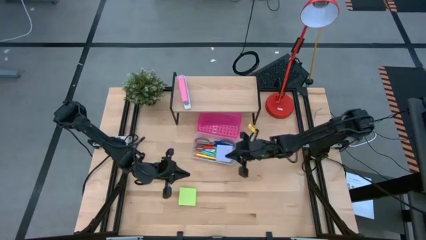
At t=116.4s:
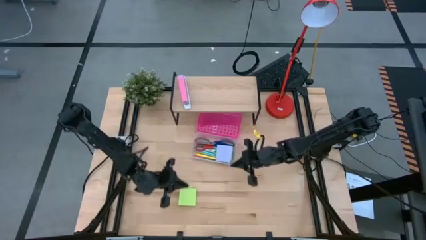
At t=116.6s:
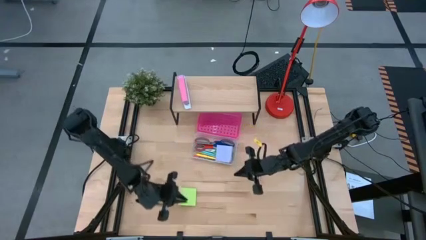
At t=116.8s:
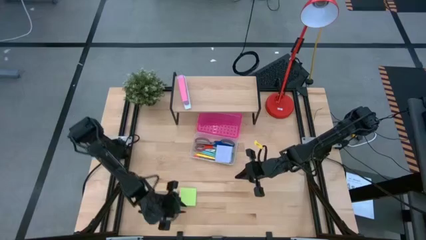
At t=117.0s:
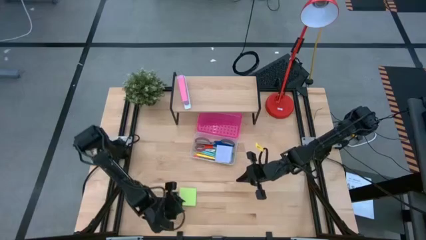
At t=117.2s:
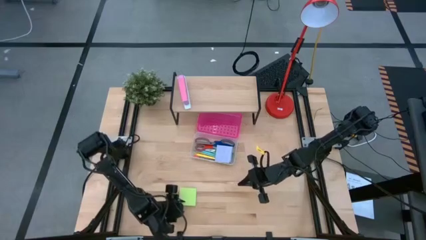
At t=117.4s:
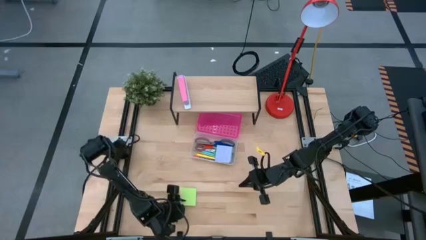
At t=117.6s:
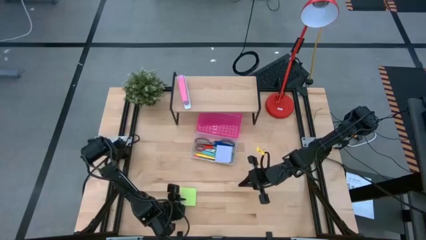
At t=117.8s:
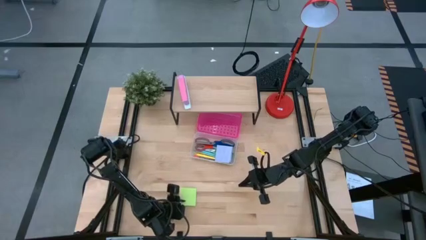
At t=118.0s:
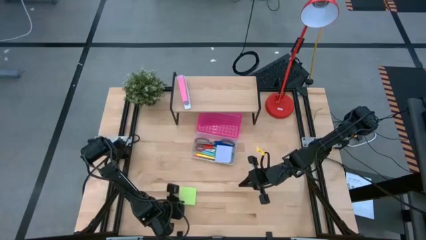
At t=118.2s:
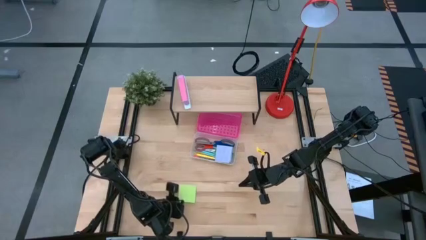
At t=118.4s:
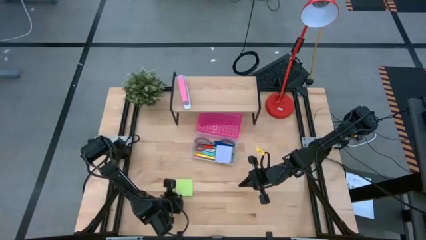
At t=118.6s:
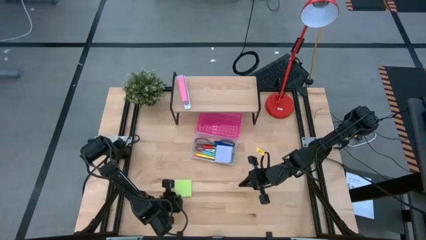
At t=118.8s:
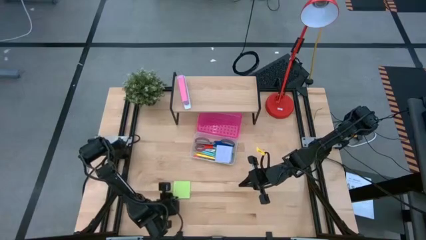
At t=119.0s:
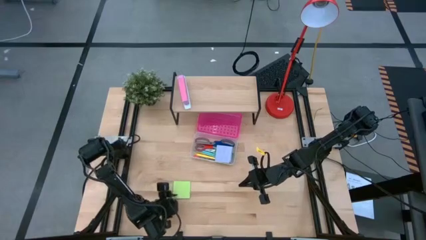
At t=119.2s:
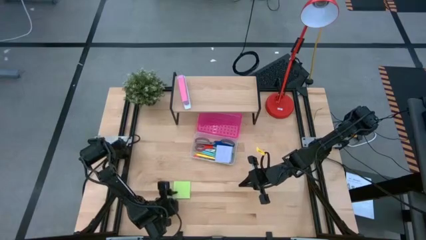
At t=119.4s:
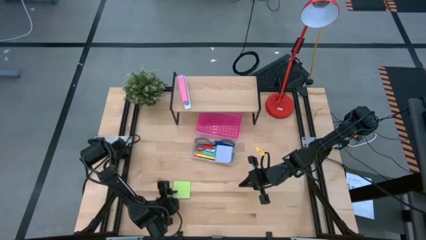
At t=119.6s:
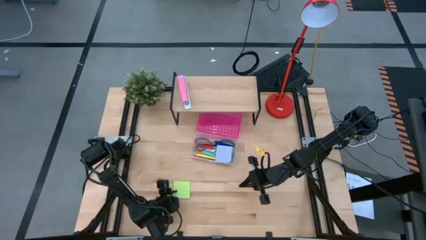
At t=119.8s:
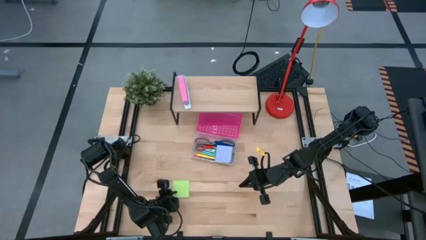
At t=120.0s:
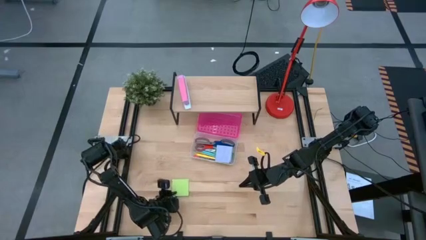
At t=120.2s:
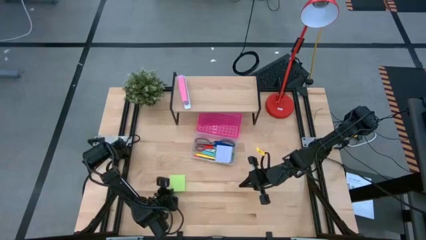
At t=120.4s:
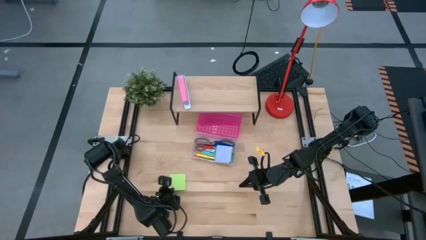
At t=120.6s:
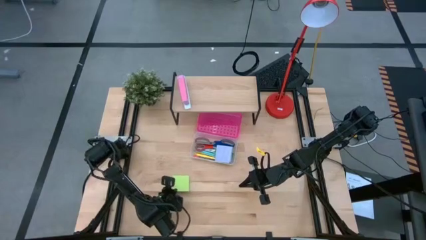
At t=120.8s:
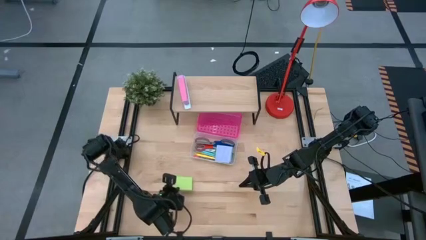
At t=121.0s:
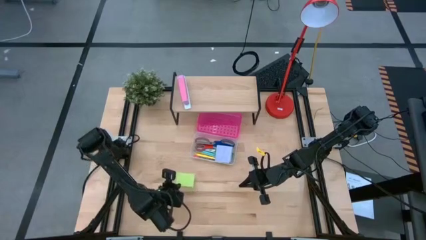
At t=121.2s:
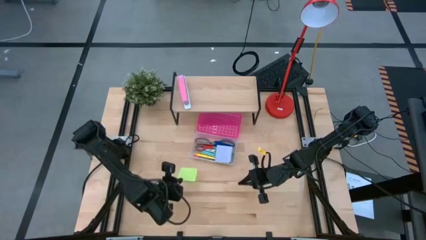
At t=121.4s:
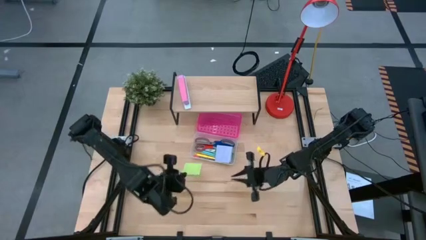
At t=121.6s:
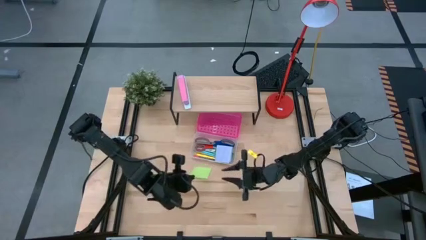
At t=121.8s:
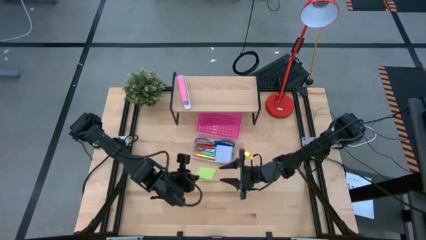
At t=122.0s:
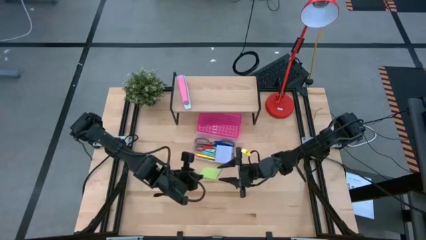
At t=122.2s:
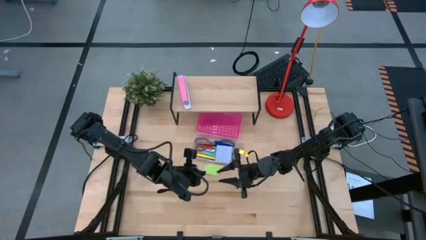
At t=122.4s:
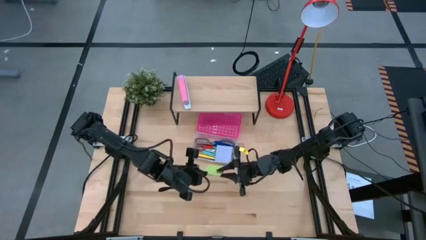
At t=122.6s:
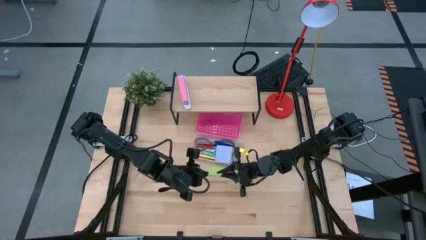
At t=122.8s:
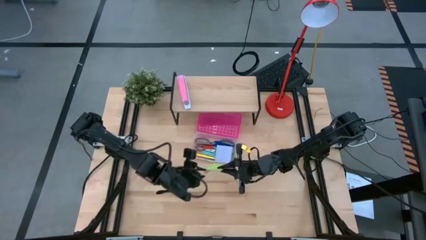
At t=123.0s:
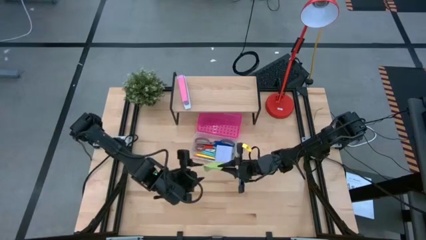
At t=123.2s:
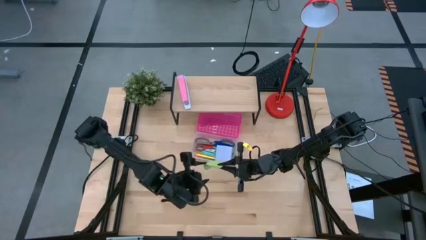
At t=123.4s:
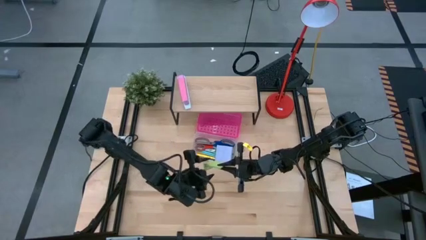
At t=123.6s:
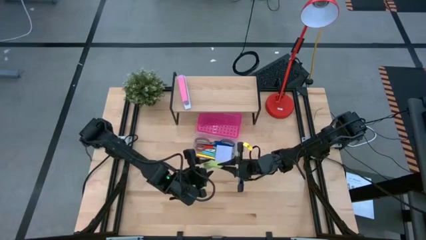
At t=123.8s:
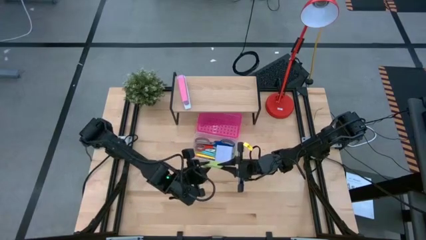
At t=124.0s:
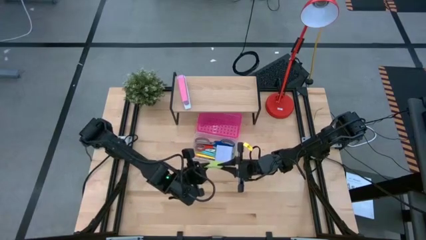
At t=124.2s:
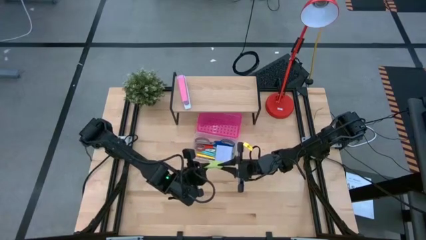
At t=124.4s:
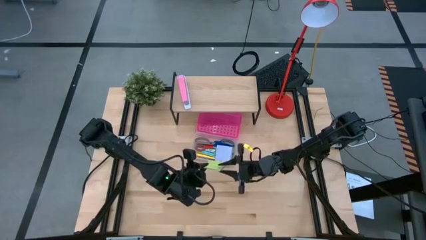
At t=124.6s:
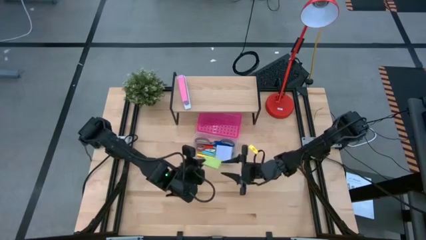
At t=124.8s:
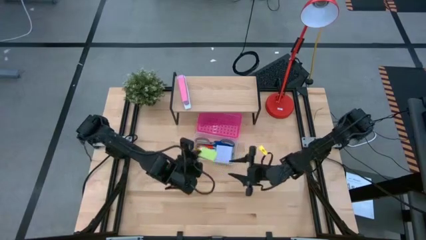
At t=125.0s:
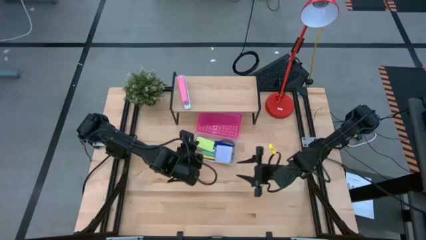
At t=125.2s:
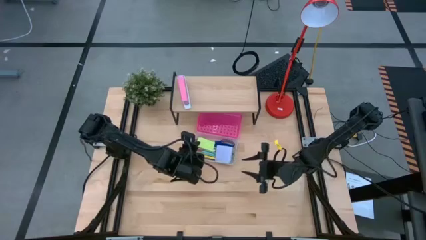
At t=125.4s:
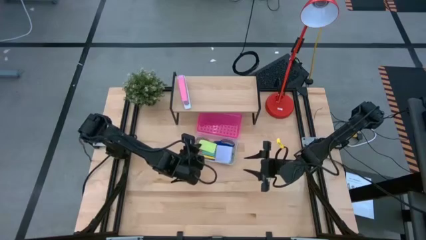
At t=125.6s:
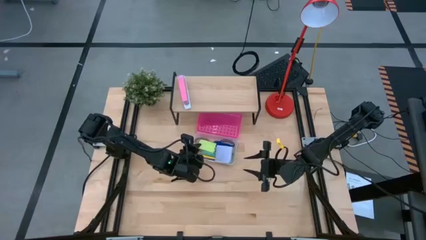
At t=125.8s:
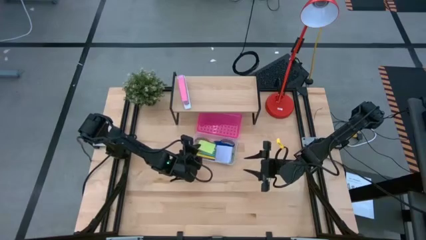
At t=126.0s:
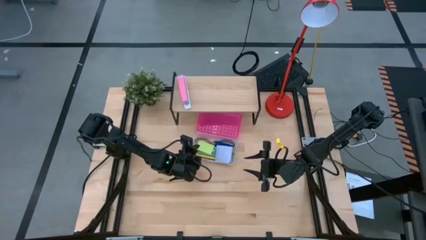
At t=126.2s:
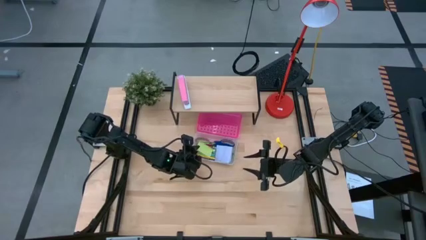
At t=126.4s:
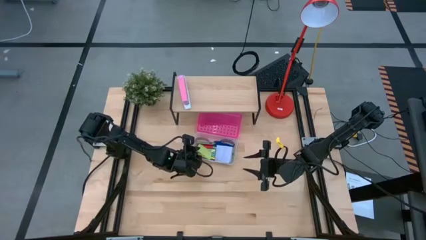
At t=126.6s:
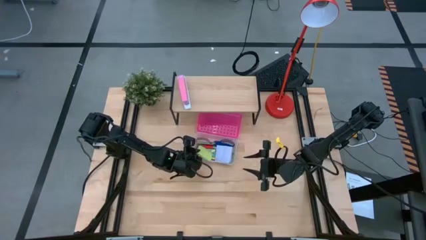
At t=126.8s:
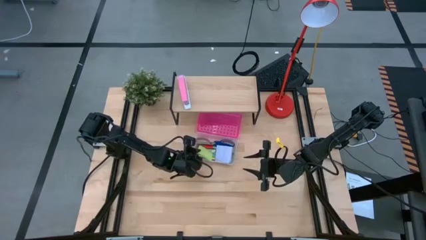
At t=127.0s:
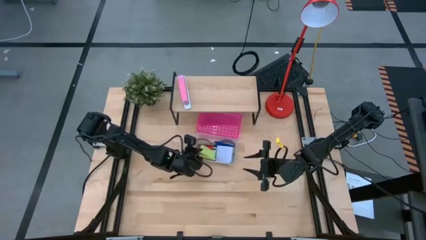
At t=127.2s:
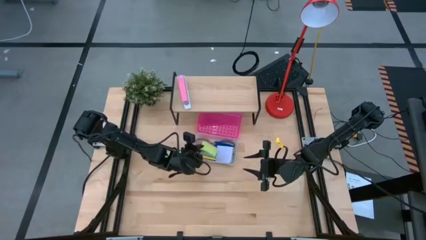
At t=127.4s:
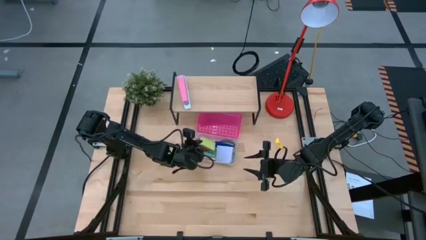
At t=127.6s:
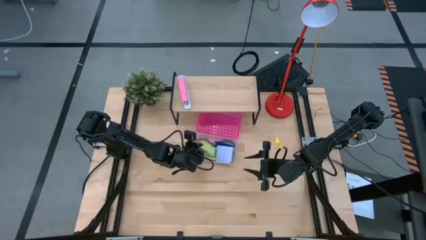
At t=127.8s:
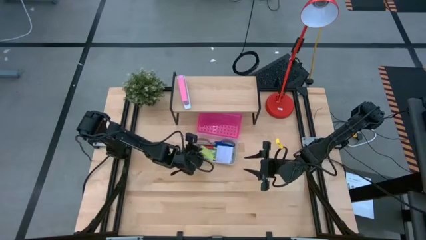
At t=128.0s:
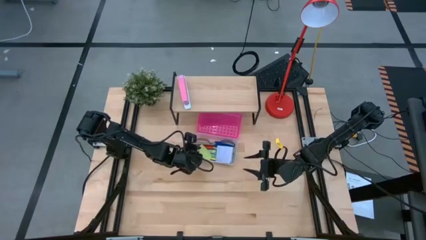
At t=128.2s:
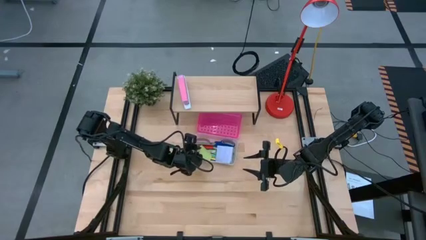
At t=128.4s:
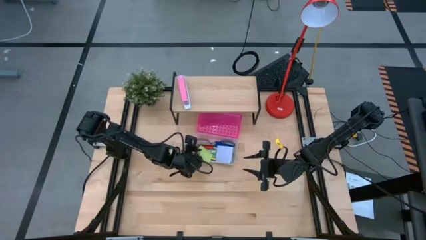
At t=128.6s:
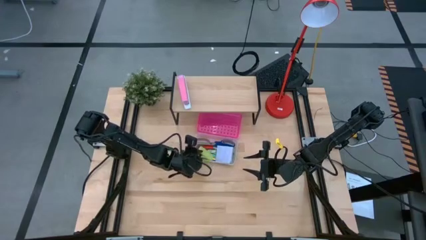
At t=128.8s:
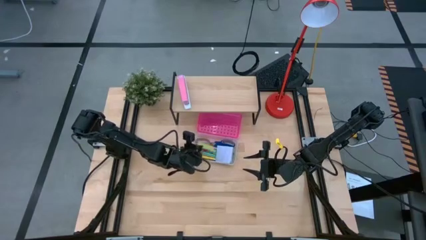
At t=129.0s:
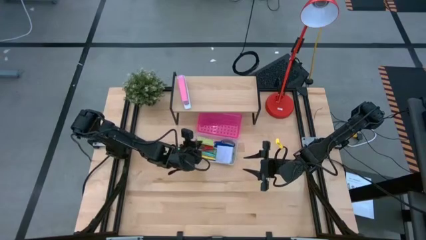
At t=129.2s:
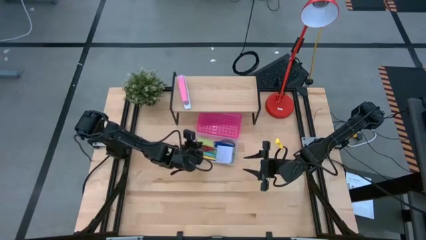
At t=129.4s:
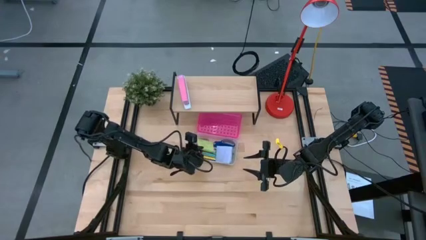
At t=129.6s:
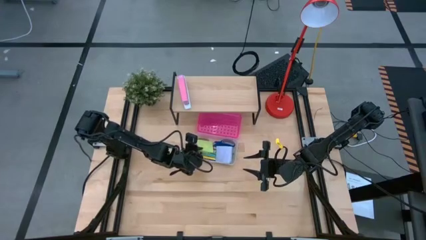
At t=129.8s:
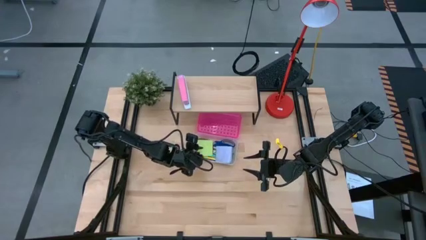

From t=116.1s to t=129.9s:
Task: Pack school essentials
Put the light green sticky notes into the supply box
